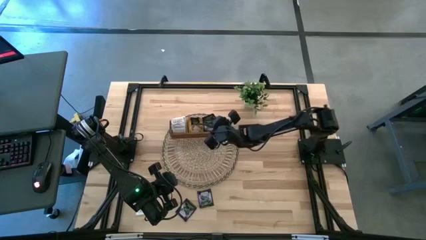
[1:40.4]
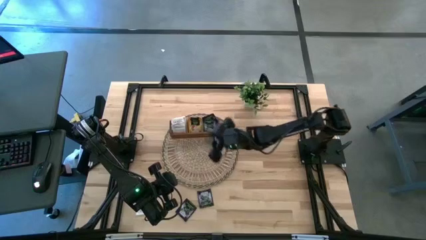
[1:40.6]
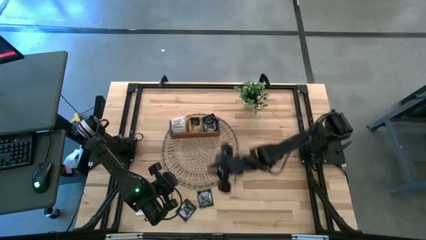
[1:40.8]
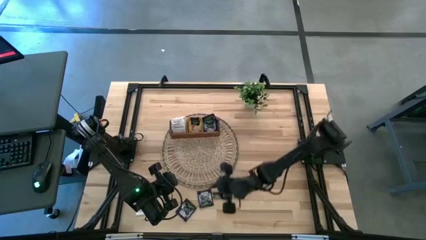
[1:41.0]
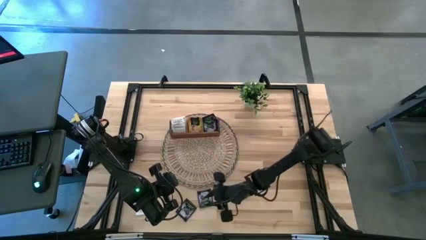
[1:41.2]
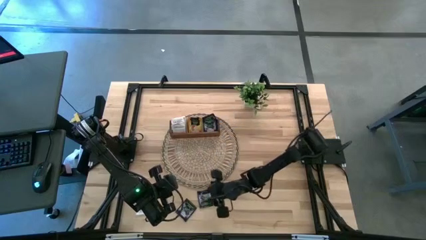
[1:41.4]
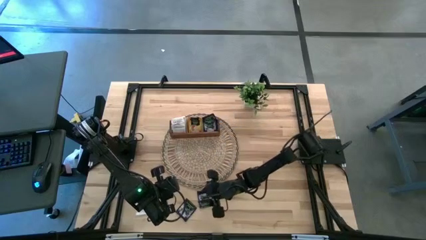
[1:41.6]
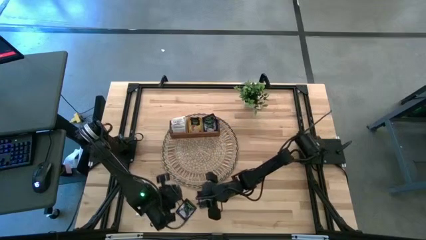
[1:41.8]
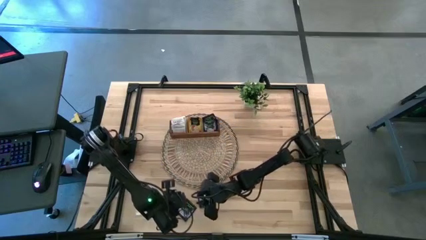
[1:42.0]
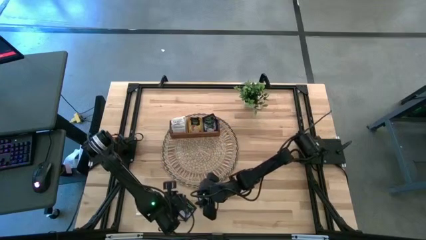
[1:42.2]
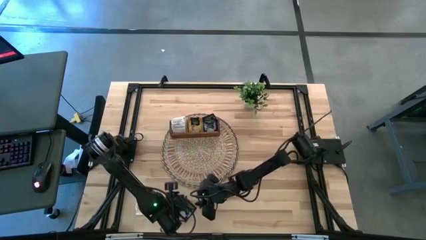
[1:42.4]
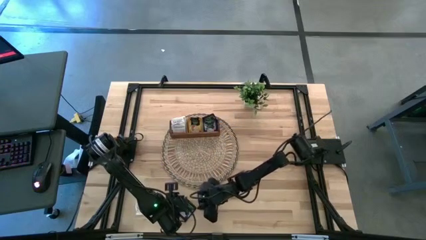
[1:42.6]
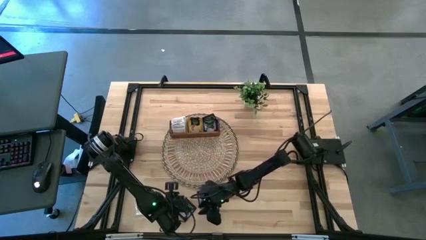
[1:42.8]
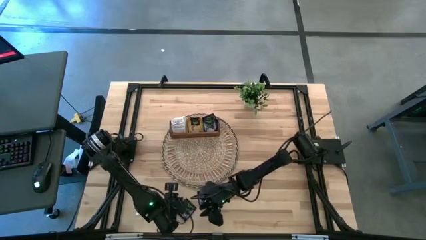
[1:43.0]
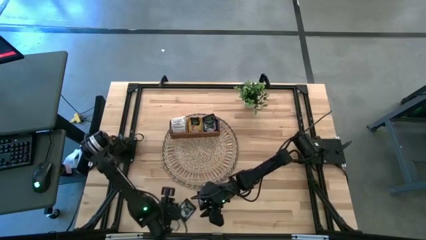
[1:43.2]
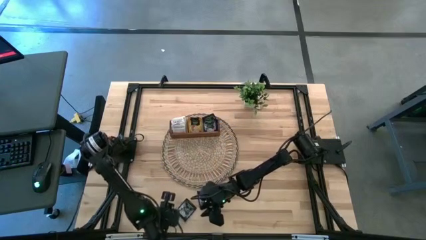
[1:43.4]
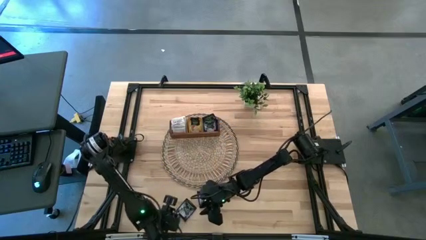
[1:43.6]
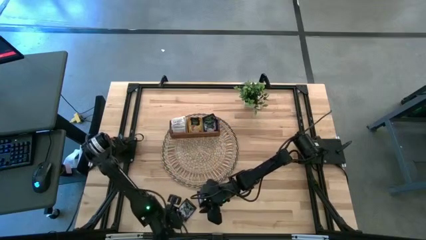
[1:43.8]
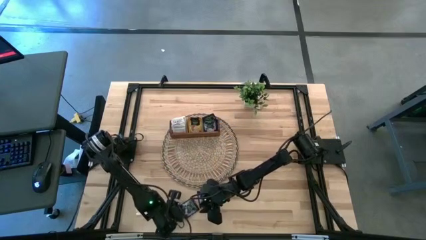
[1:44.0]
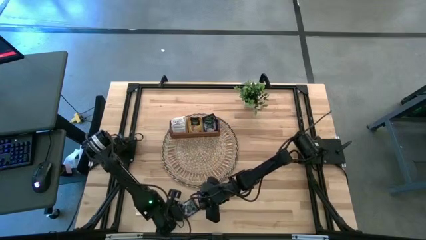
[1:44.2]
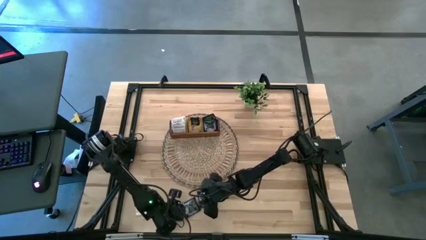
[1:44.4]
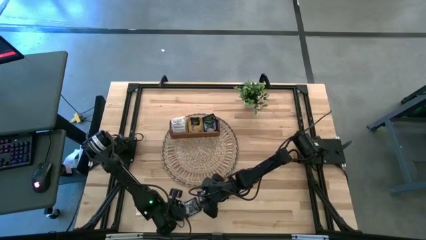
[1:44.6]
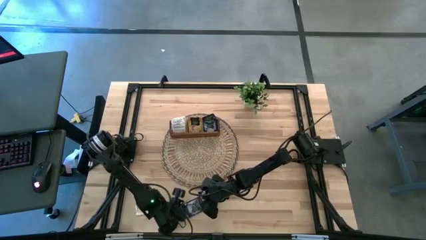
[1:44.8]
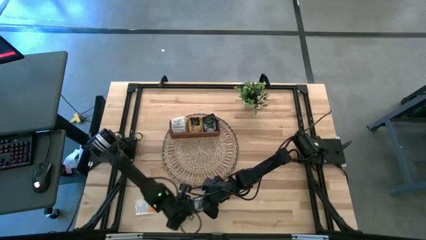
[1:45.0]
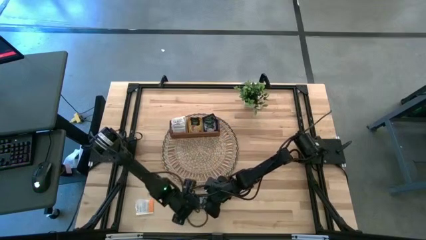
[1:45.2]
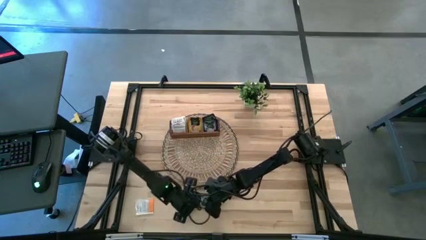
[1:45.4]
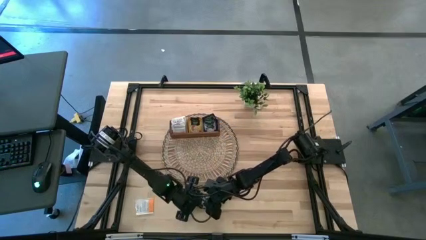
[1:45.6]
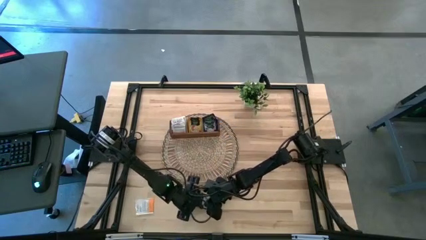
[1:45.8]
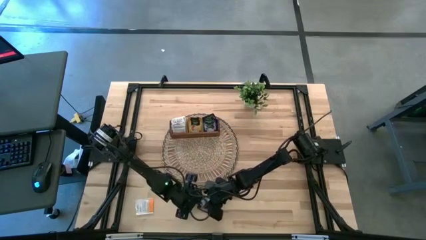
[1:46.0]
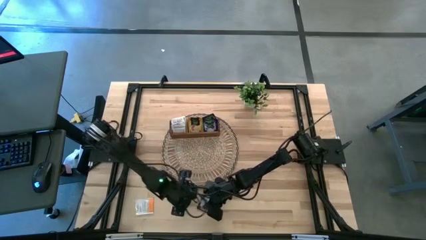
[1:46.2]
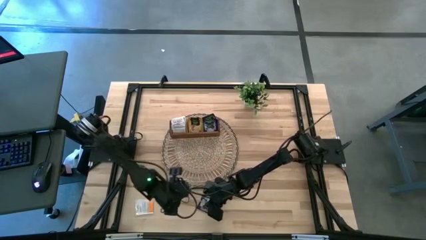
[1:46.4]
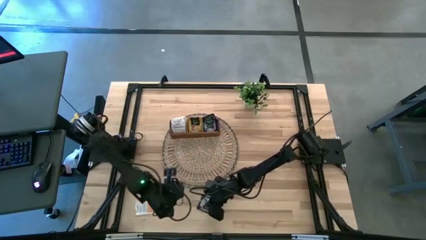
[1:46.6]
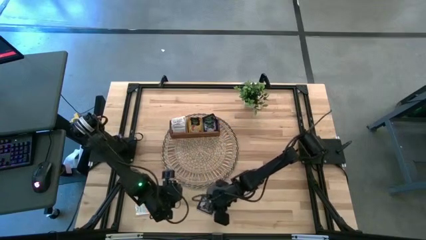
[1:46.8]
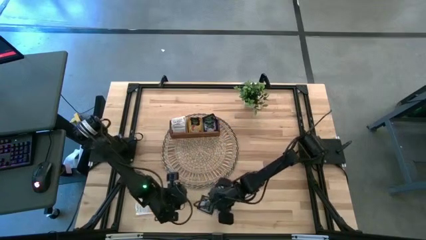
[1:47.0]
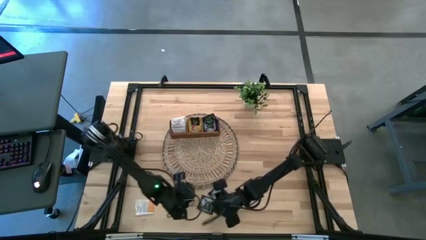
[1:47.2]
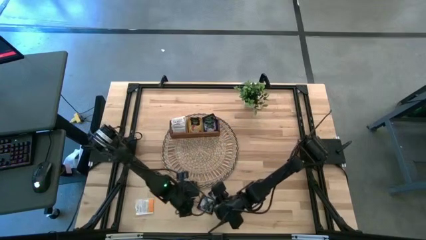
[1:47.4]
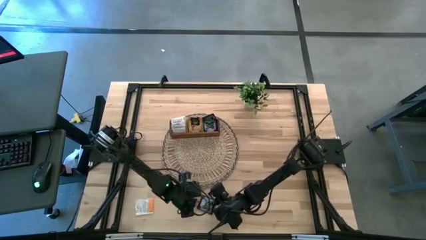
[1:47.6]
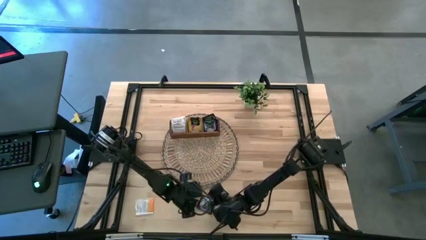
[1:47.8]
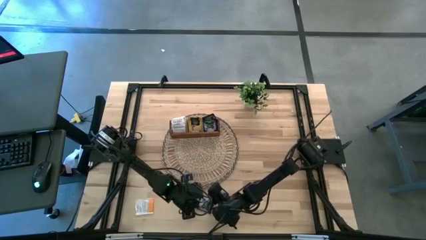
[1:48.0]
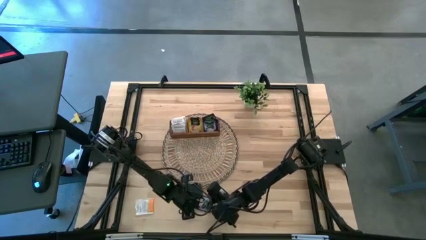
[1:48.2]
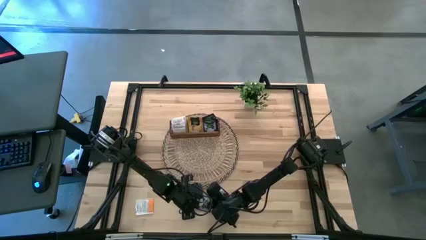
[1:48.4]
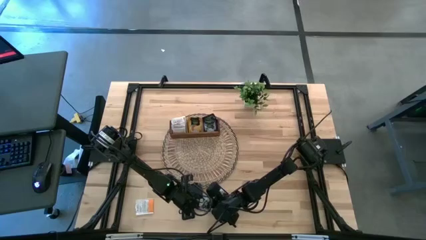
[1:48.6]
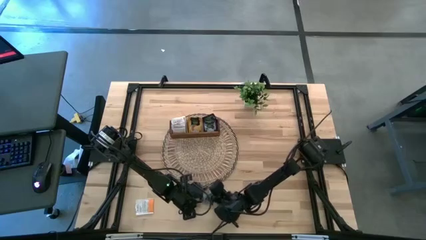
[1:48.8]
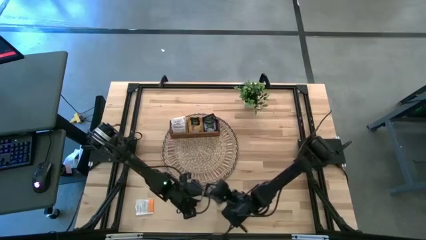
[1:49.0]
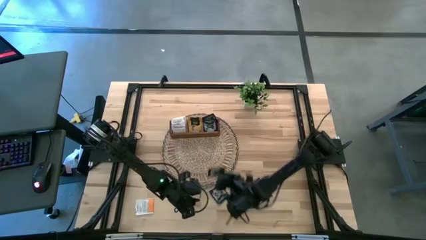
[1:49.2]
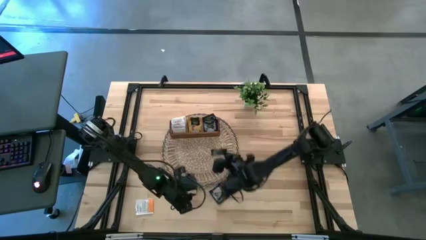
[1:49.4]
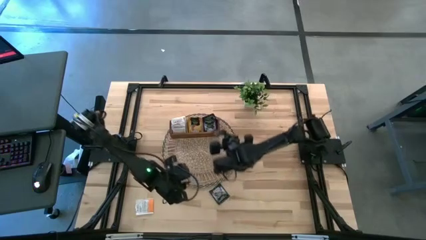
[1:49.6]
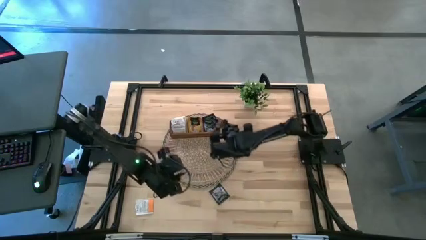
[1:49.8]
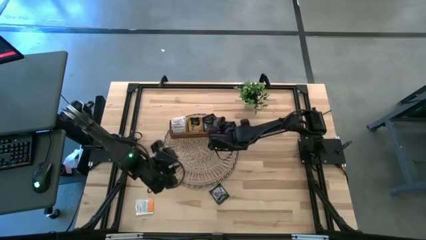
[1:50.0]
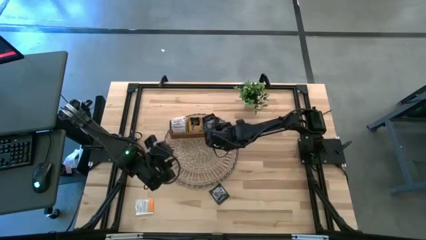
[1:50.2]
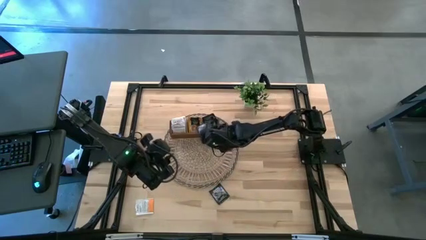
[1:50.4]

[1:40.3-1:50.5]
Task: Pick & Place Tea
Put the violet tea packet into the right compartment of the wooden organizer

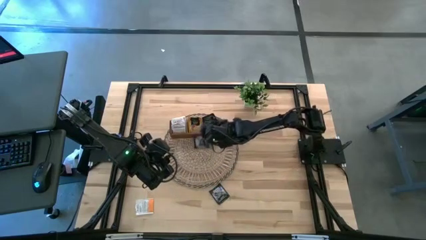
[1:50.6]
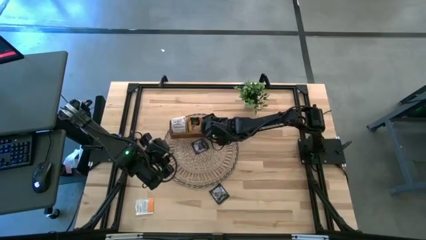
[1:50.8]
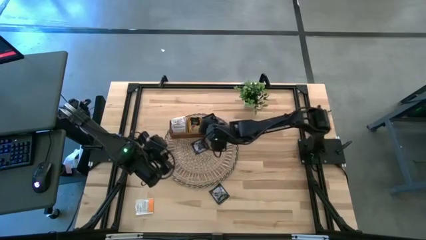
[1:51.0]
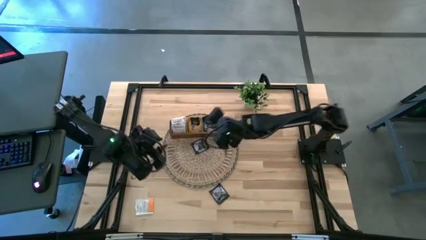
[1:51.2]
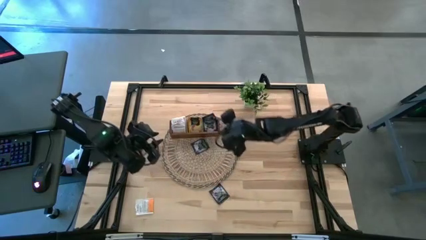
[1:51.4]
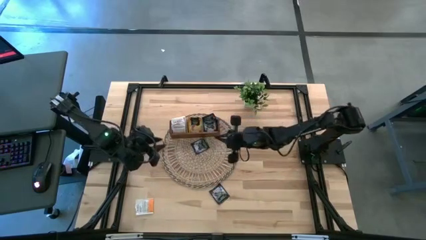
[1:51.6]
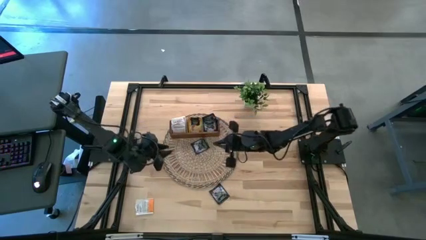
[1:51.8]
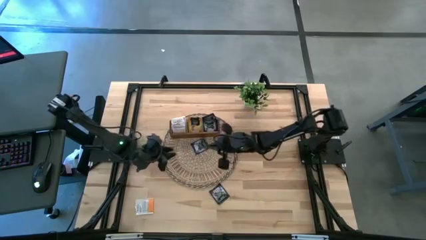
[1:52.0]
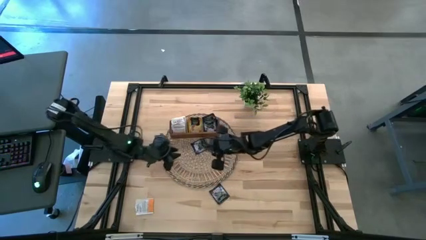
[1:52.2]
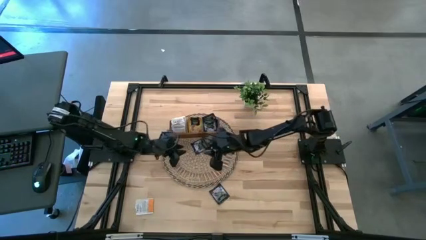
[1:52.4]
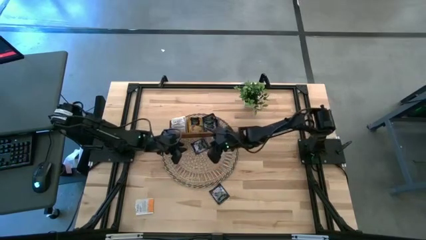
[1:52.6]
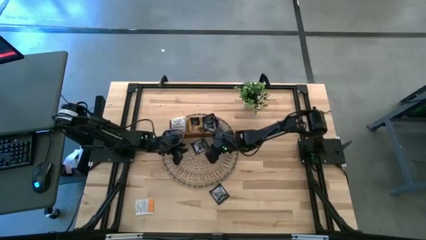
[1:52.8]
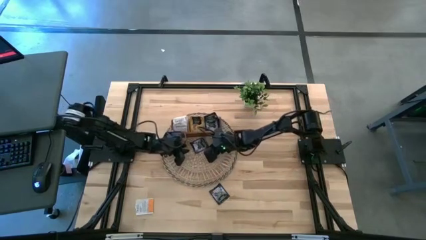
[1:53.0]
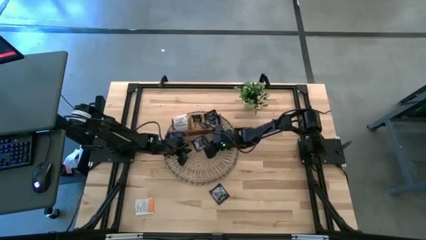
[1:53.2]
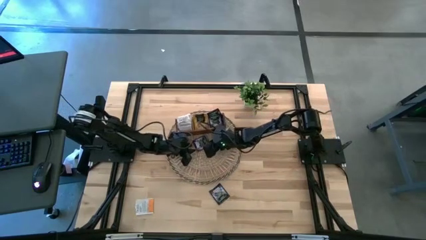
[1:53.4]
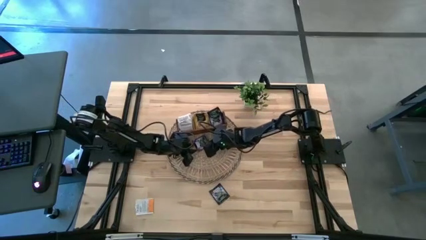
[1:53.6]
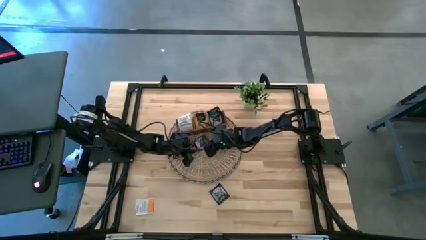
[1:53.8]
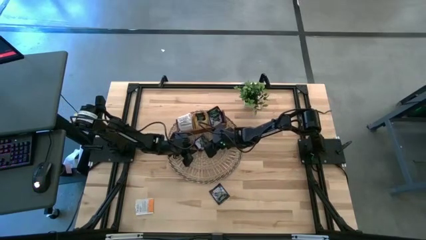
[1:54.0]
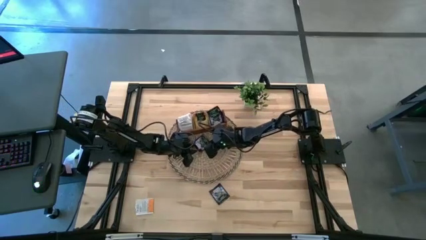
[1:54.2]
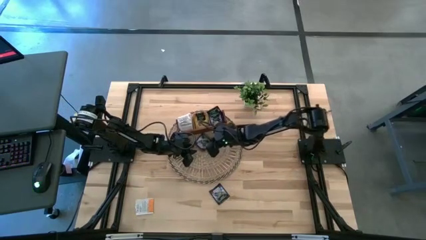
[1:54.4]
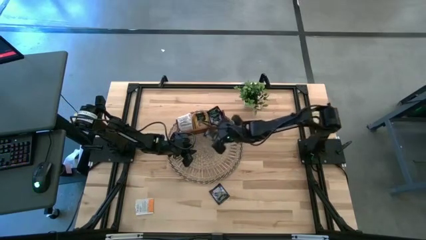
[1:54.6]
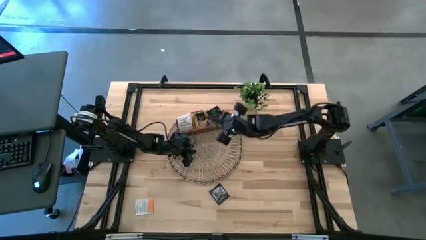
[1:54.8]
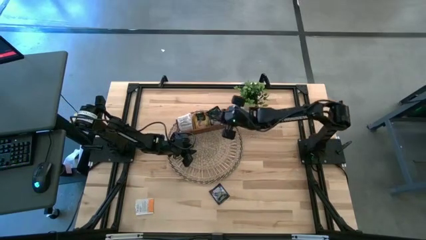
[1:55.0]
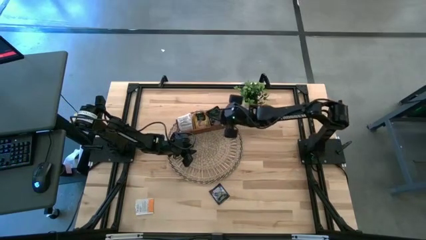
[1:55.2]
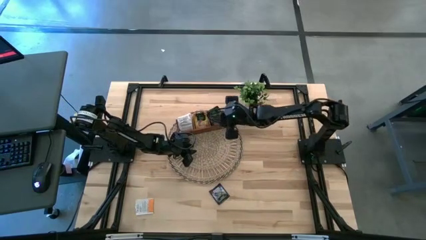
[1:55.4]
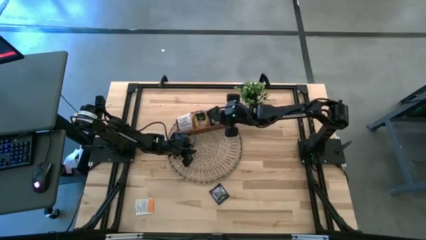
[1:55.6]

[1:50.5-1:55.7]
Put the violet tea packet into the right compartment of the wooden organizer

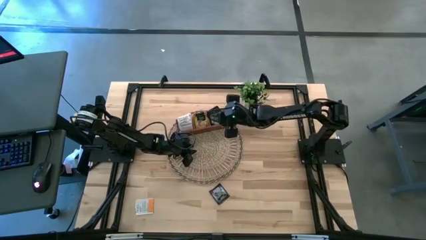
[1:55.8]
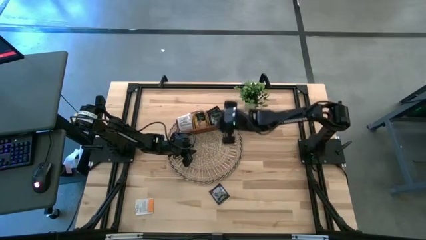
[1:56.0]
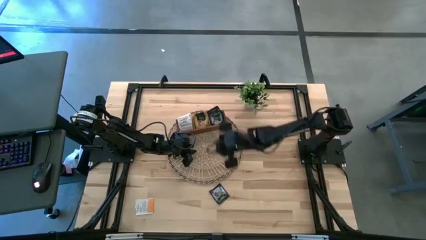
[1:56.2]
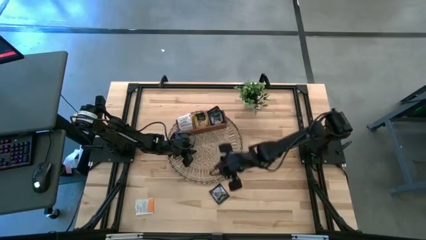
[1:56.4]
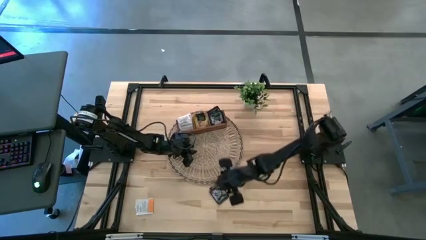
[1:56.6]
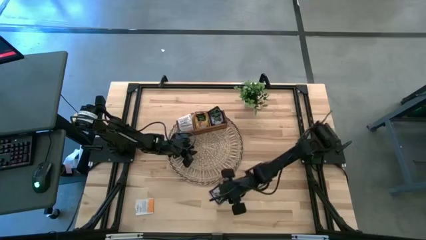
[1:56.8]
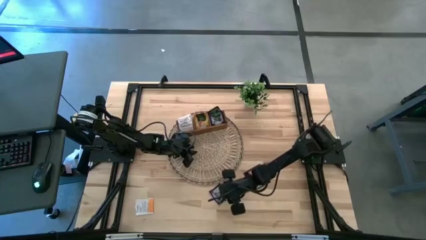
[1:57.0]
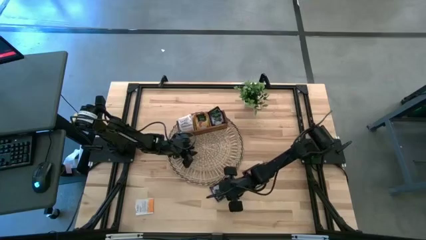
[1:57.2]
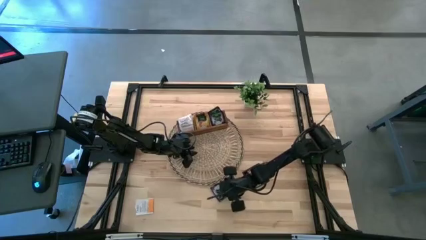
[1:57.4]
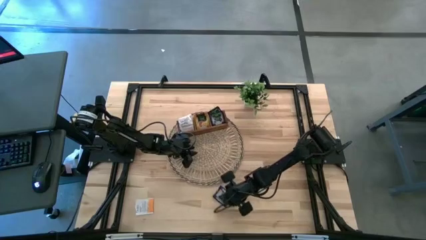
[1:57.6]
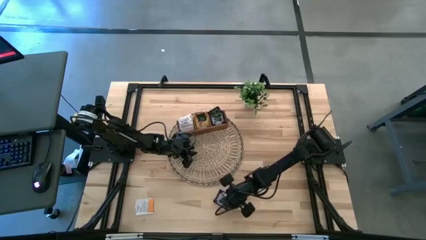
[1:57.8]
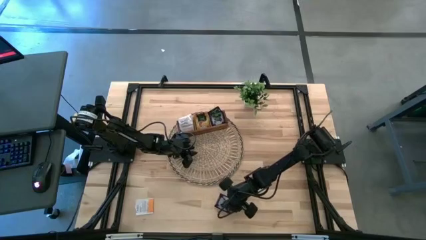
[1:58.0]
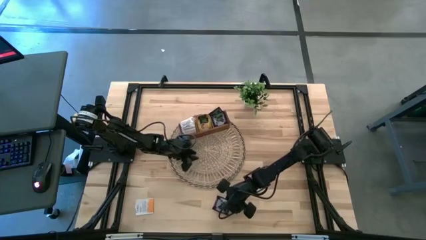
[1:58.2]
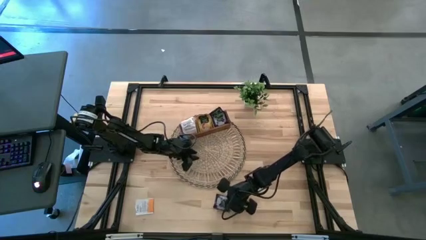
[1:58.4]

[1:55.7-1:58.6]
Put the violet tea packet into the right compartment of the wooden organizer
